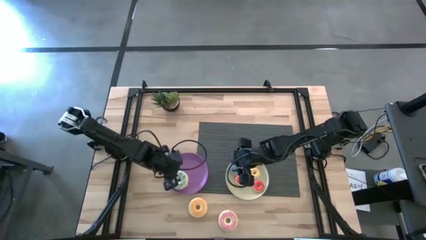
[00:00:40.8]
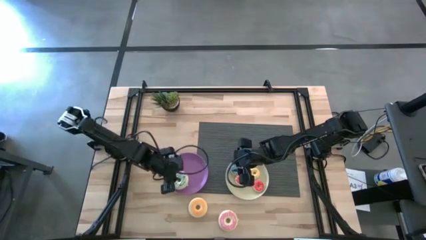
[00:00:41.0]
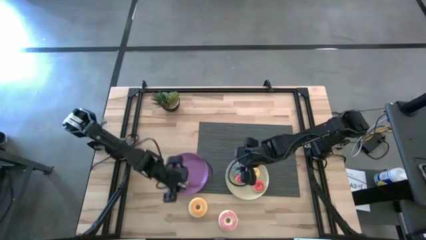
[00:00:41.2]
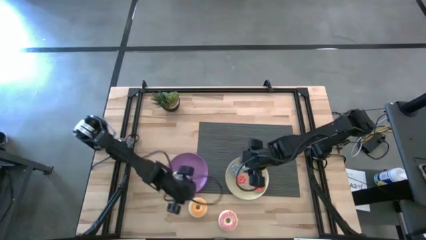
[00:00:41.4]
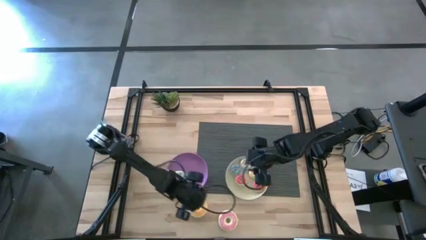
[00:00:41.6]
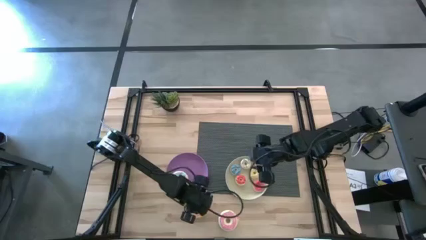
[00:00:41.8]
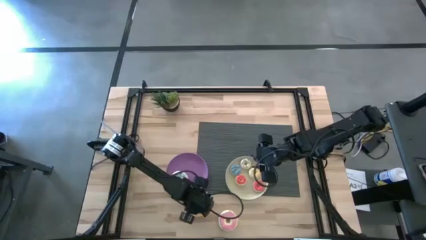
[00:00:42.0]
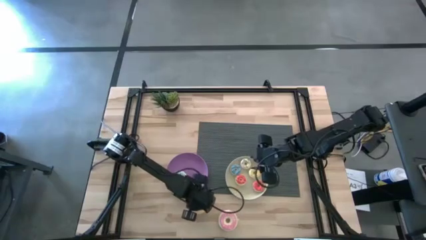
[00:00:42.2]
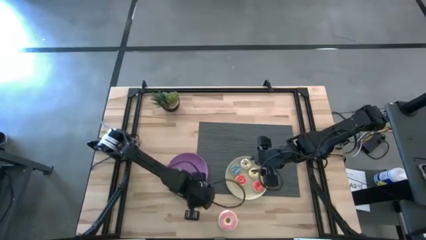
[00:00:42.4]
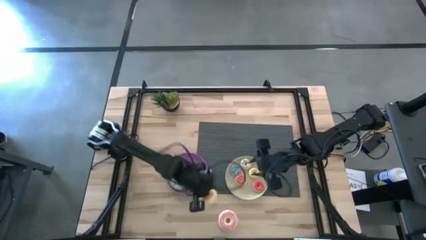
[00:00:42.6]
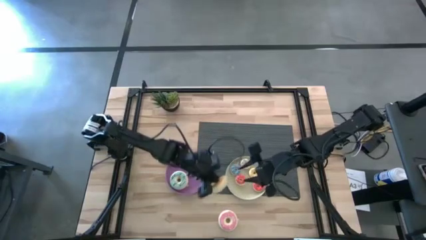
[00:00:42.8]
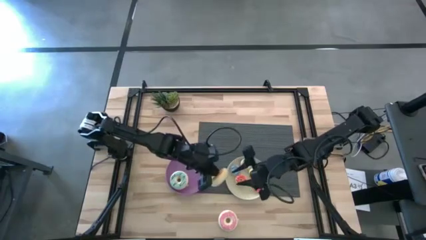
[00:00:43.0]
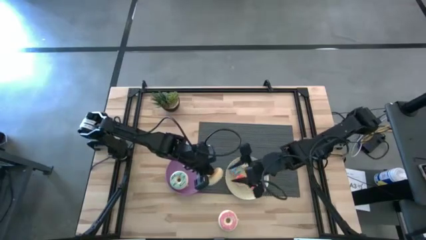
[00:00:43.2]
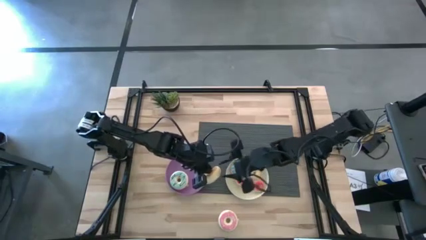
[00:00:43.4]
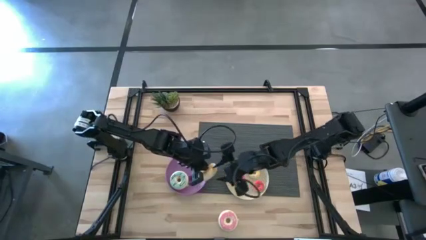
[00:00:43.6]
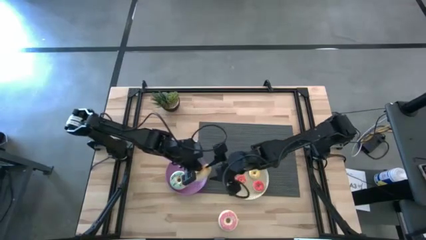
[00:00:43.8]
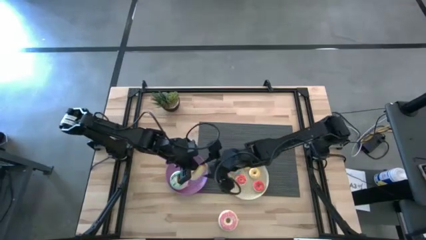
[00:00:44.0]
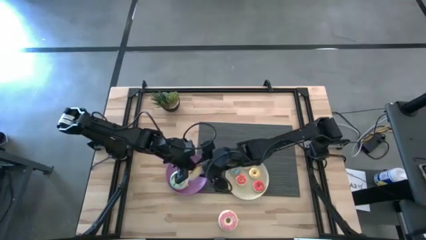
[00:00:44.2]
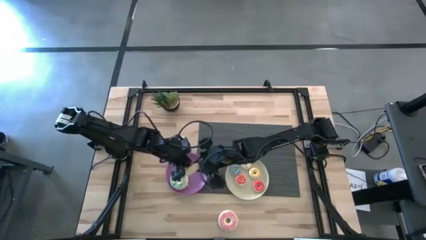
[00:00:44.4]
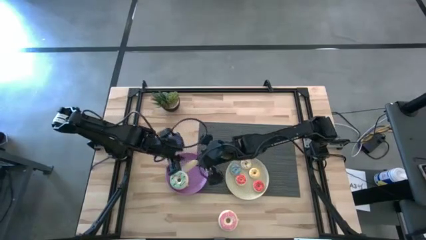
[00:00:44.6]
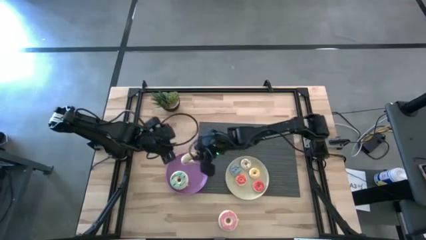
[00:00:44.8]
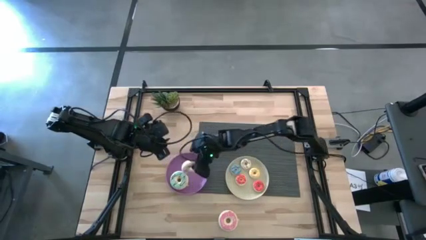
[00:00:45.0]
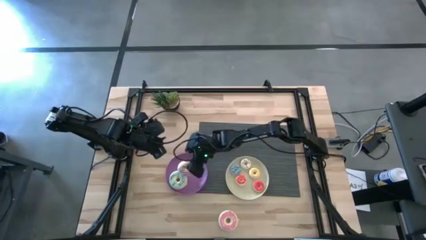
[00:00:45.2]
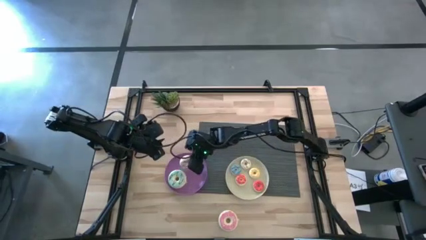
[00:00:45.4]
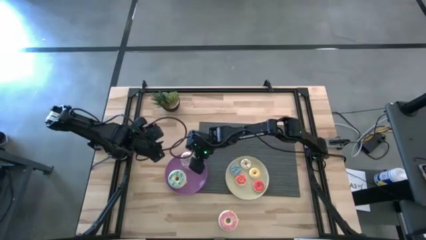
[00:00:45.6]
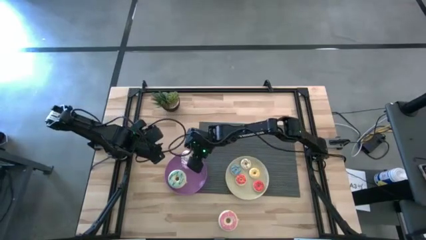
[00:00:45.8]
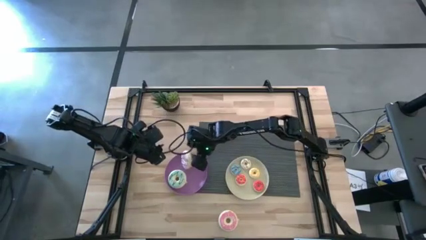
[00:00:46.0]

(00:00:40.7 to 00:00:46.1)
Task: Pick & Place donuts
Put the large orange donut on the purple plate

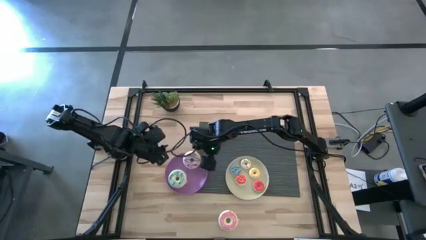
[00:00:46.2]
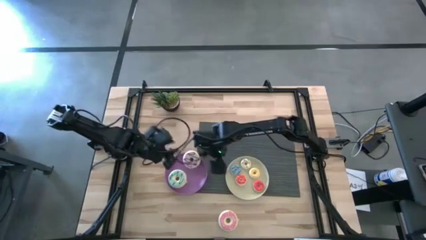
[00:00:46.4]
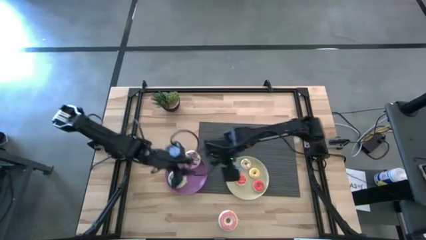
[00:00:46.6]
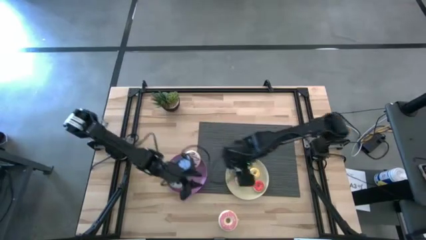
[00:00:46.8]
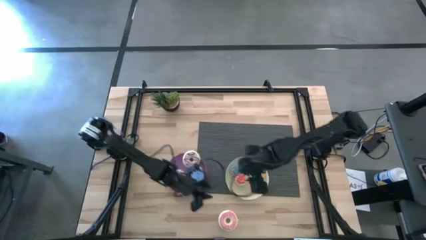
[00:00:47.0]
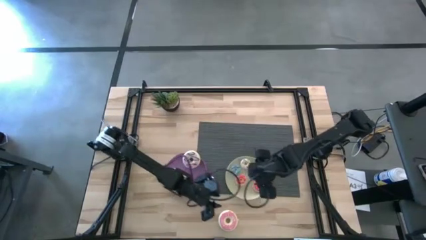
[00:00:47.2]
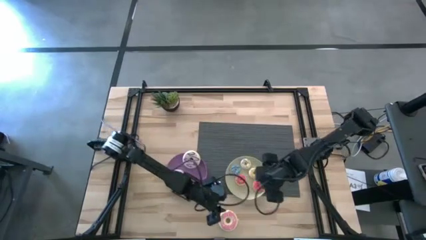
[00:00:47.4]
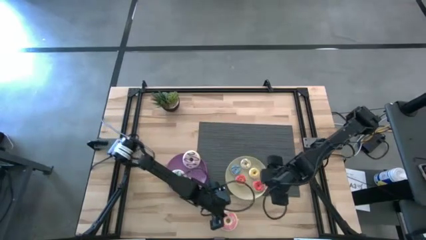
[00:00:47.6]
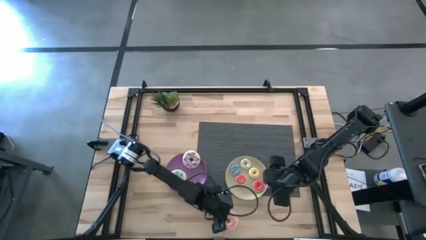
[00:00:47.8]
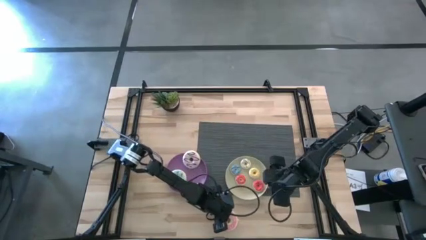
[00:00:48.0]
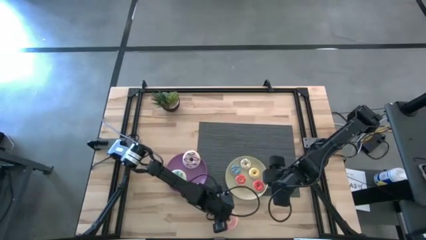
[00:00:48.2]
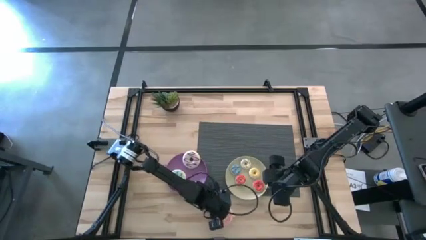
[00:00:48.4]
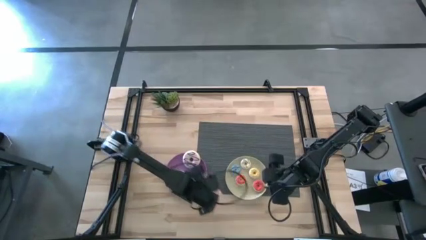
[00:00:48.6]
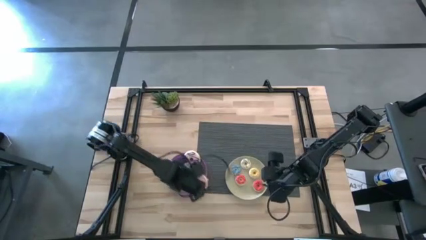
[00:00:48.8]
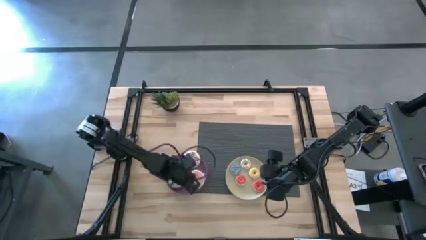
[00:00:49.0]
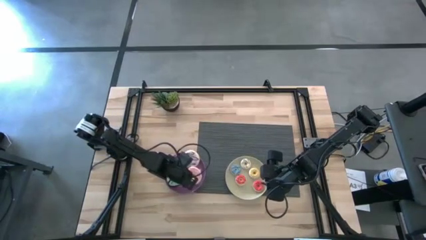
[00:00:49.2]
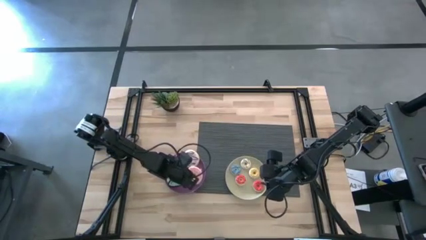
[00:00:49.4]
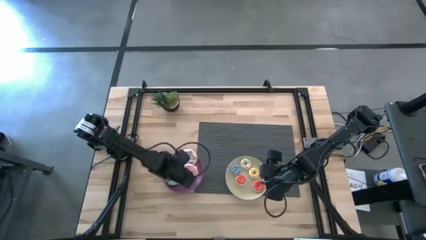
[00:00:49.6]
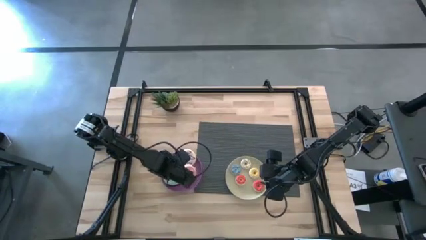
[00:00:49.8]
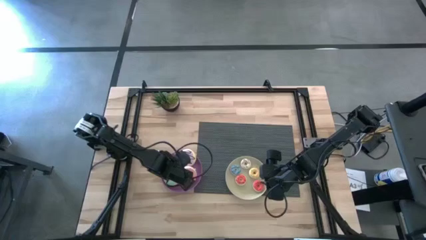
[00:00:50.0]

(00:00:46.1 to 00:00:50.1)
Put the large pink donut on the purple plate

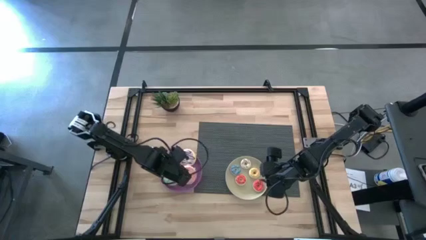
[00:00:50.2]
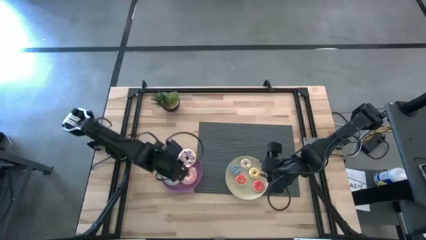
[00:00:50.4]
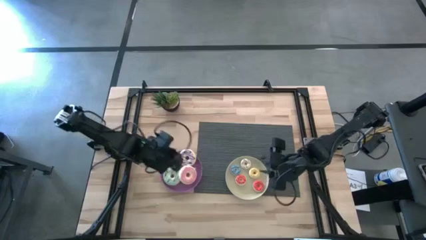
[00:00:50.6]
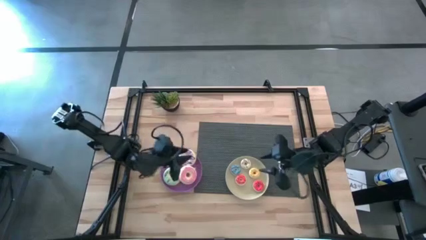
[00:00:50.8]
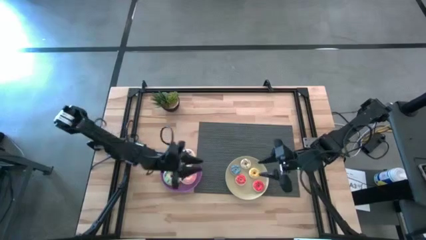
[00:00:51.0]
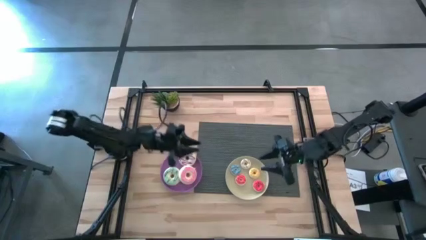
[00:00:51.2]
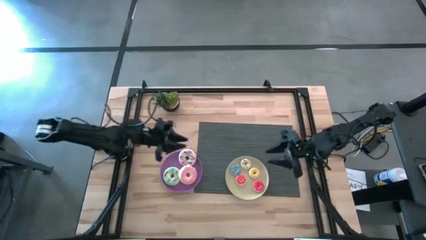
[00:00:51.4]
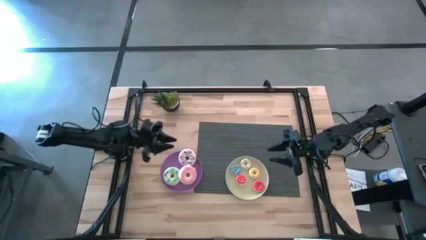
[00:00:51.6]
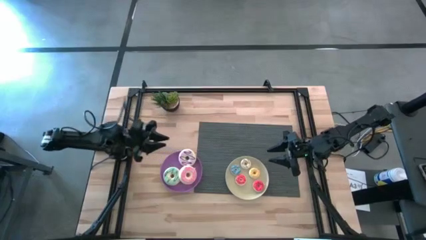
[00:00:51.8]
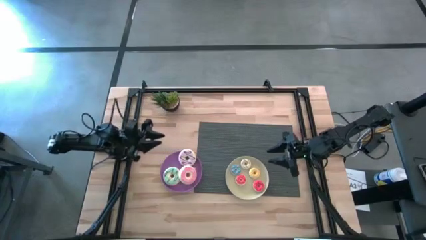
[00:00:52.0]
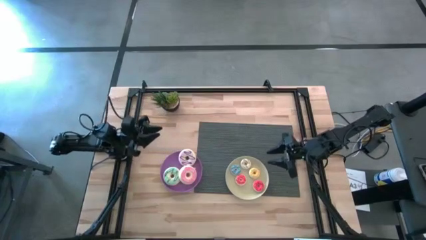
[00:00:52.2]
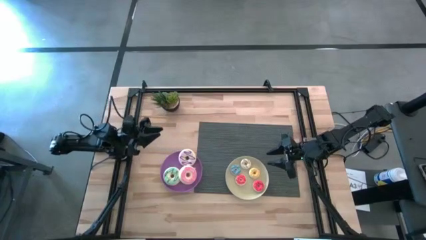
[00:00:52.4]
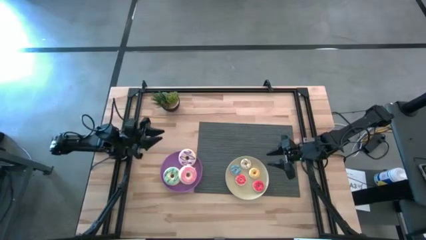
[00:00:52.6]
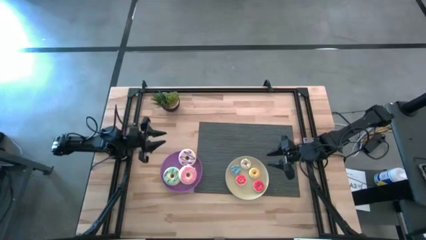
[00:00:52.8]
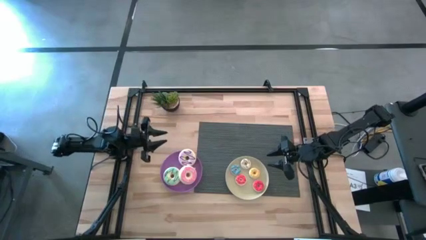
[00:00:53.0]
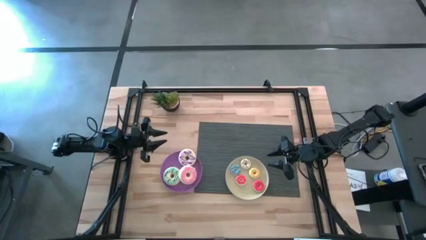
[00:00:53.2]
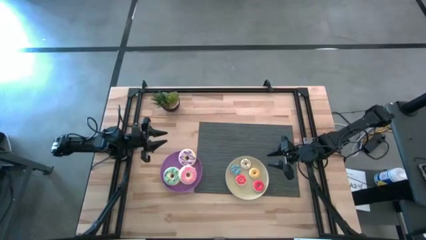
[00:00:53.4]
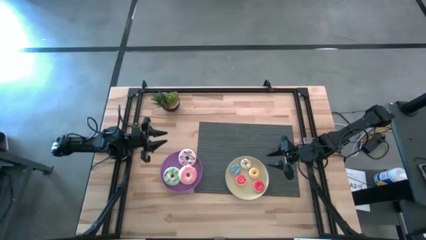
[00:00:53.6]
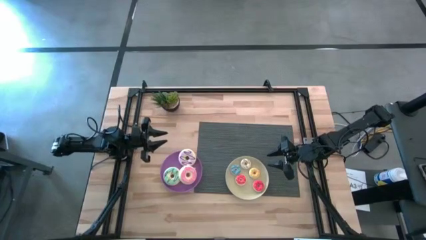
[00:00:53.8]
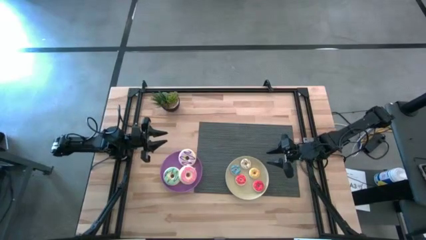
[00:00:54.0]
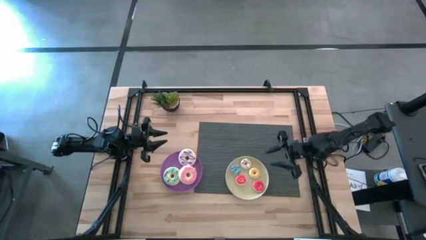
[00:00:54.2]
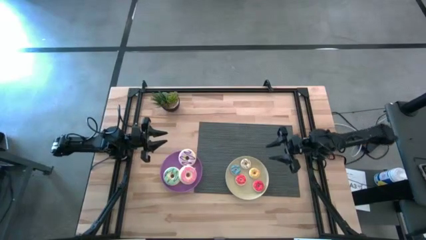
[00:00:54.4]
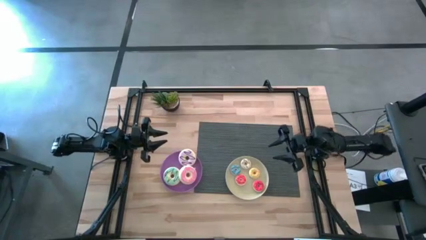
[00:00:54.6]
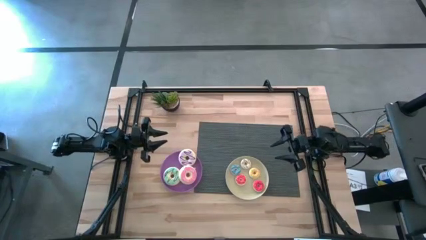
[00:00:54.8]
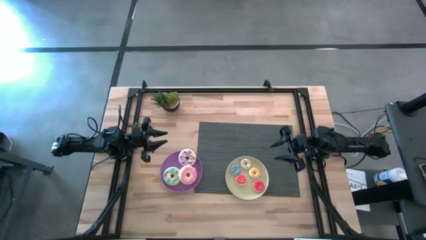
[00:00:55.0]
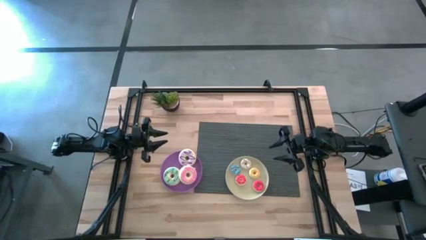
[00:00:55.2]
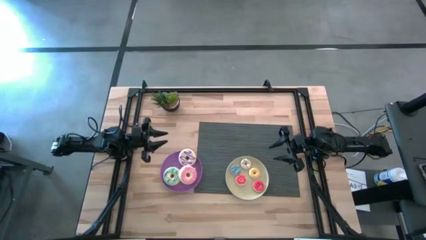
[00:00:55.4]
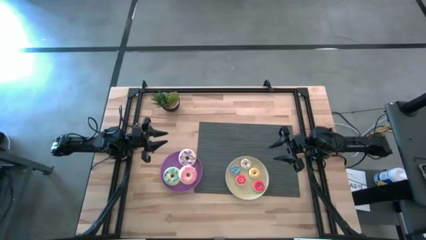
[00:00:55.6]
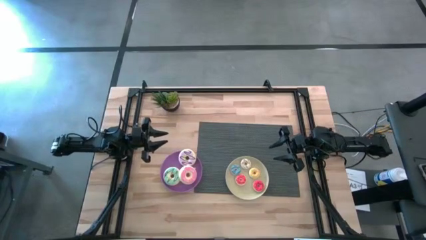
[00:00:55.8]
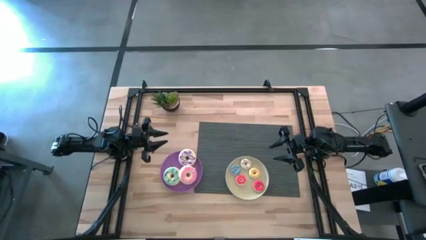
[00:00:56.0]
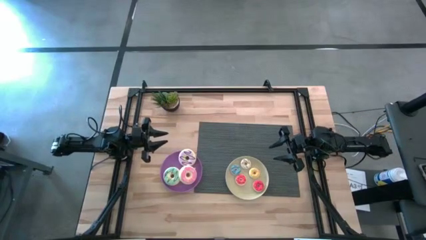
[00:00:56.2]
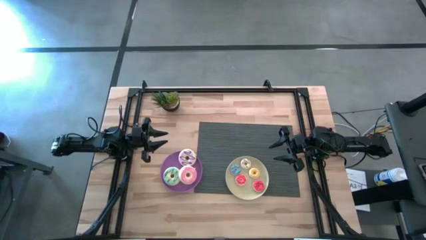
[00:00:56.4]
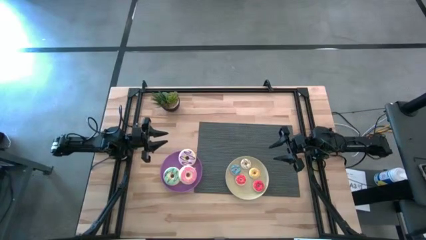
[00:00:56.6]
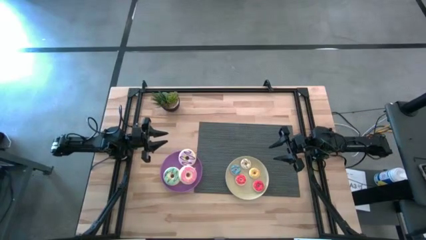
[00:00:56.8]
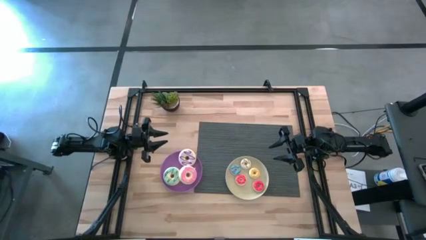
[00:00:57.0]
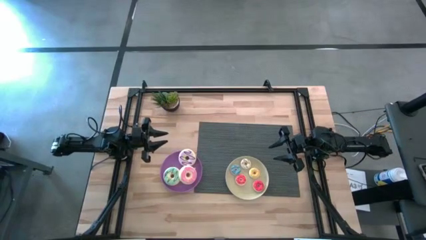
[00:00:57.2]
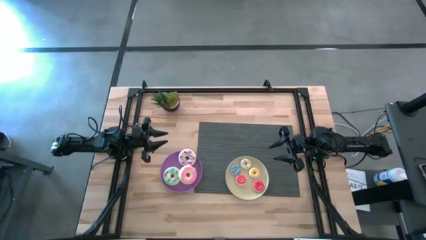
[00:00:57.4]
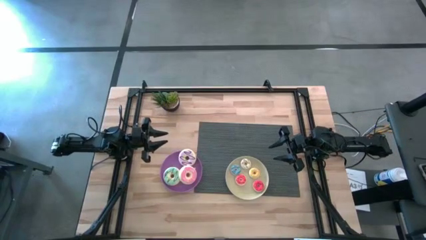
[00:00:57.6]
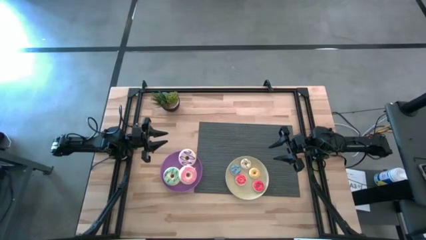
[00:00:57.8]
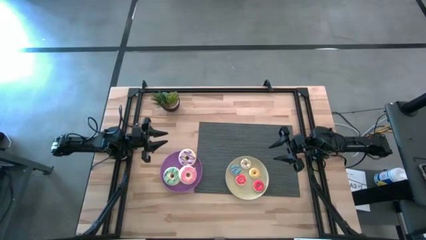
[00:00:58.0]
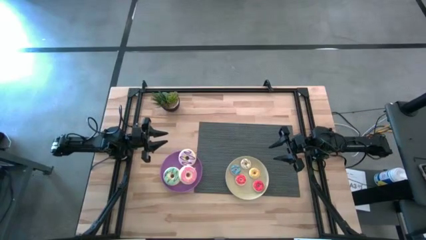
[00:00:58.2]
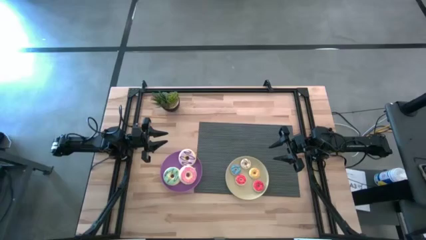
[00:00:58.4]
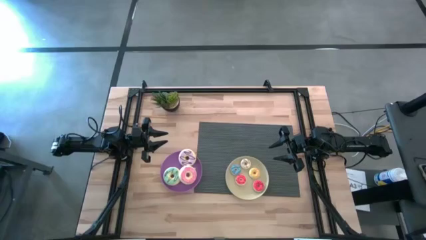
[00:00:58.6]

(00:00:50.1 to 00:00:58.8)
Return to home position
